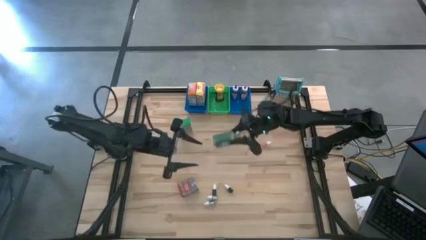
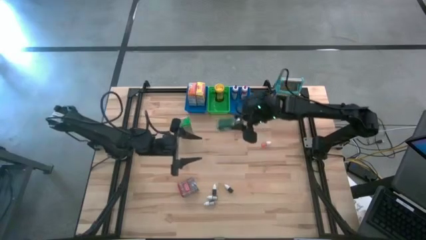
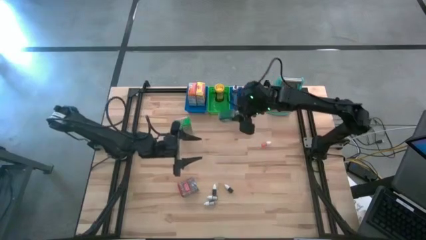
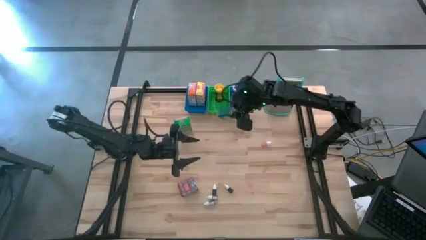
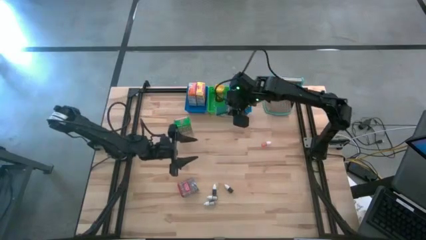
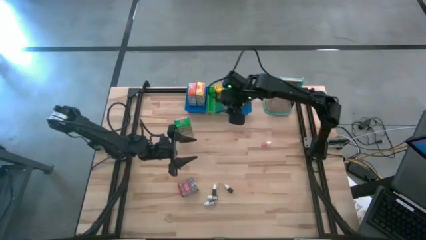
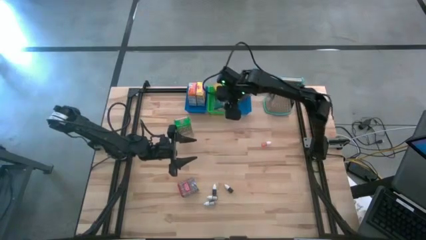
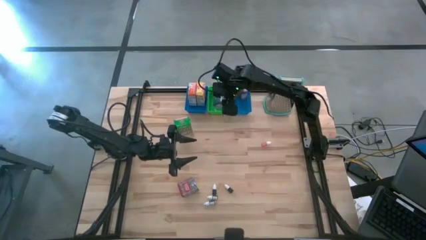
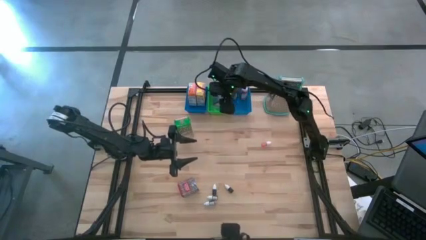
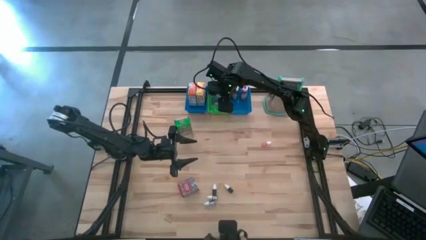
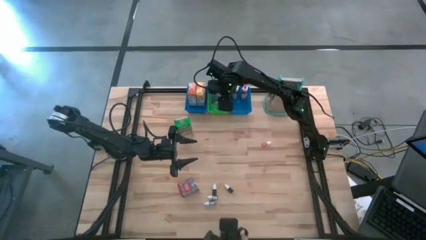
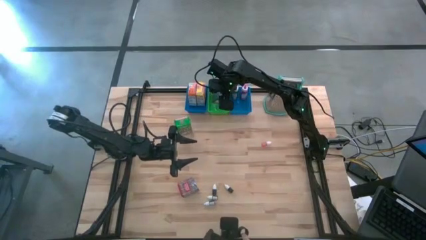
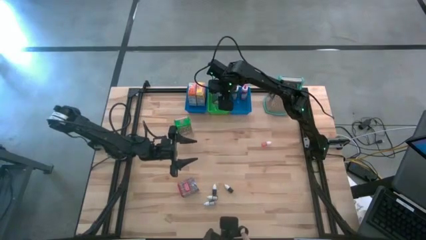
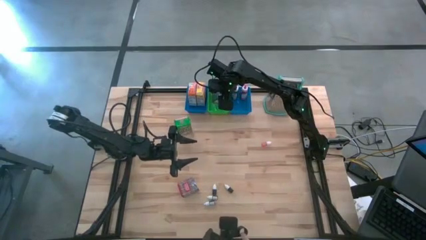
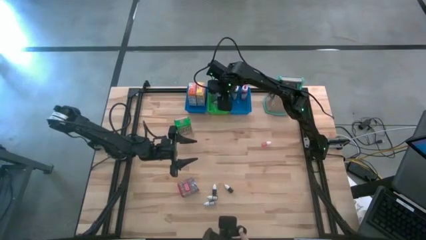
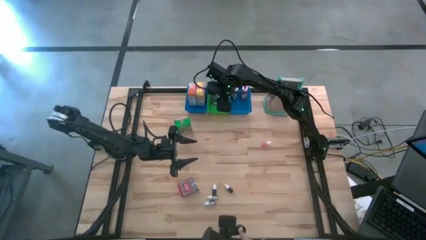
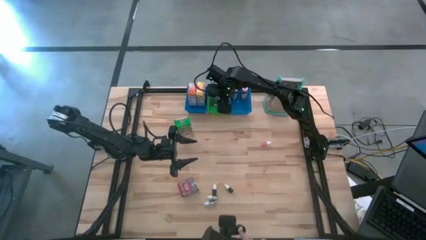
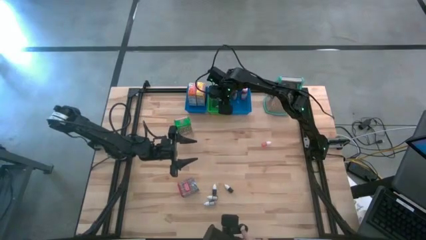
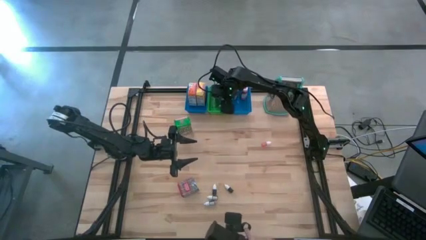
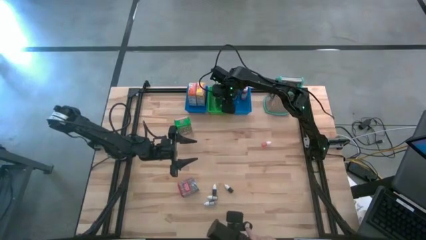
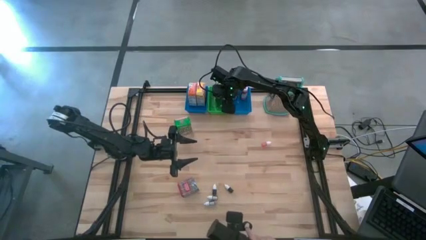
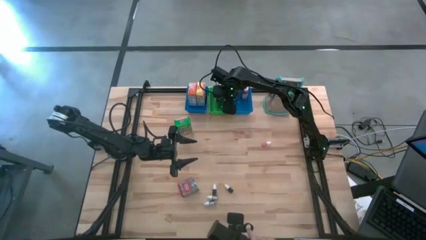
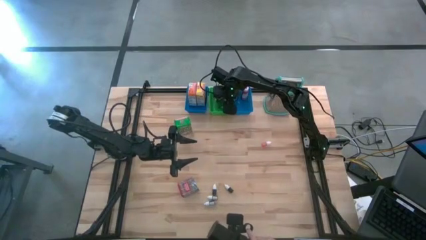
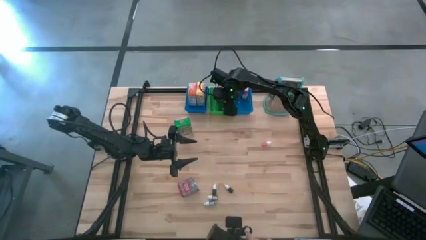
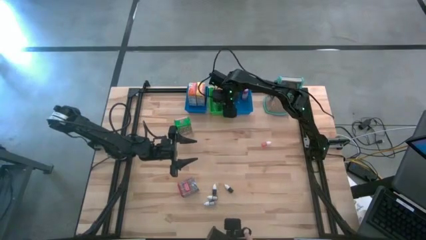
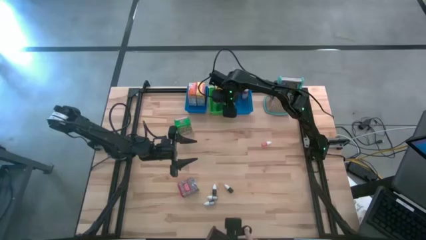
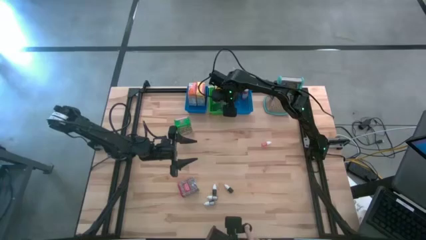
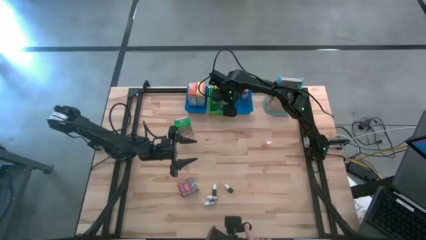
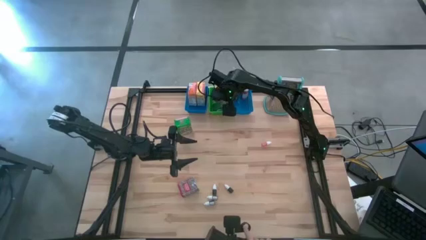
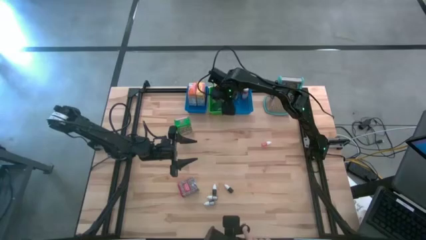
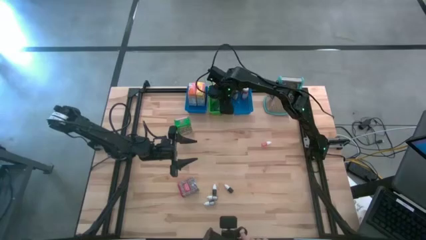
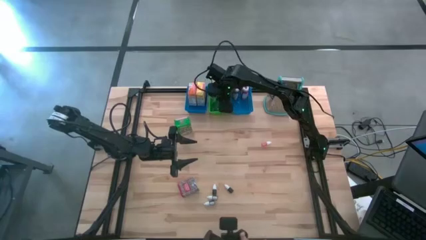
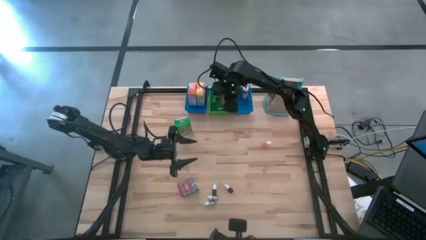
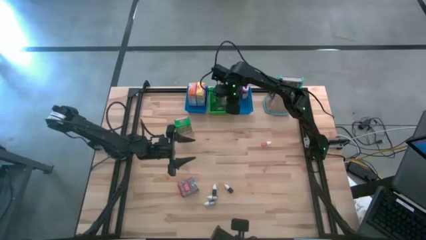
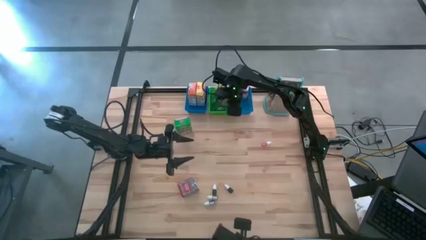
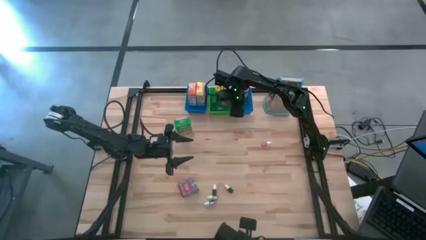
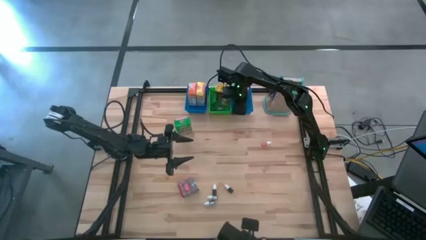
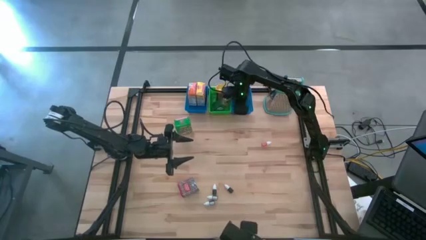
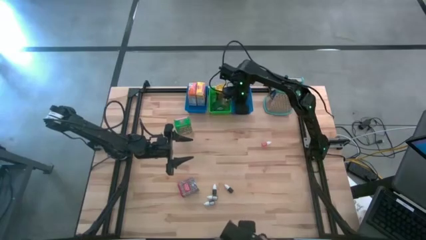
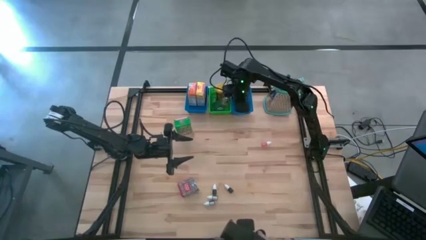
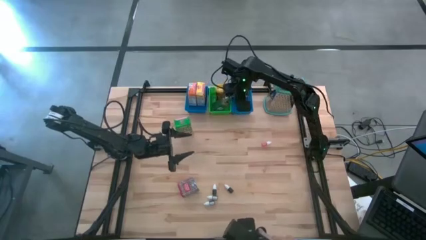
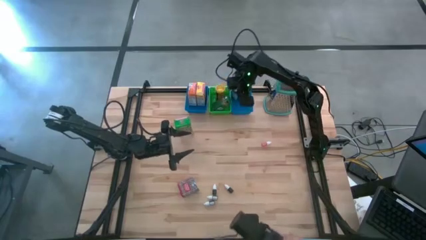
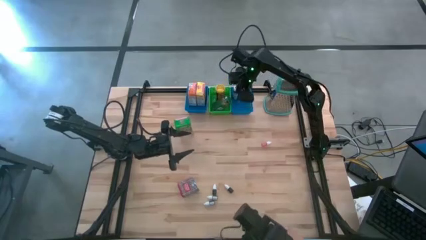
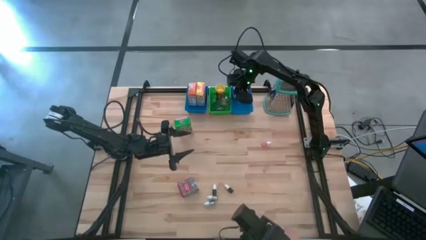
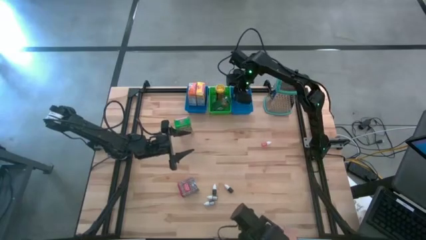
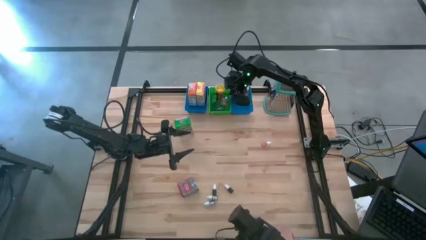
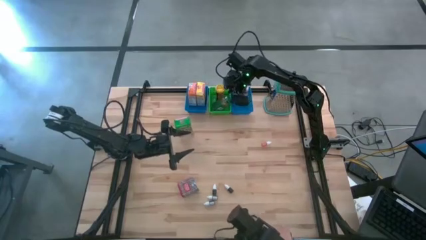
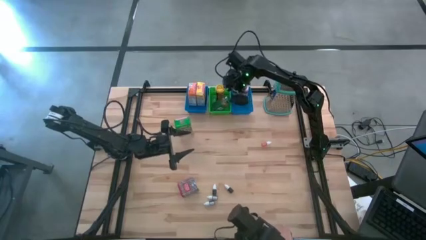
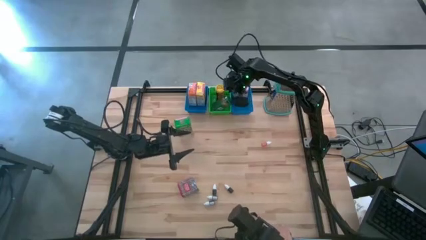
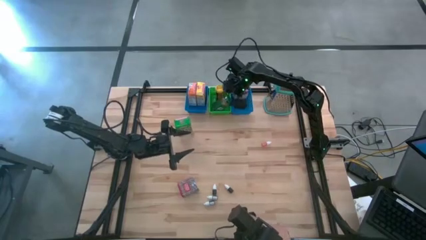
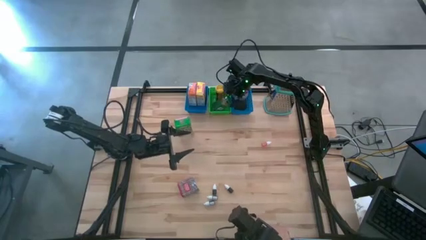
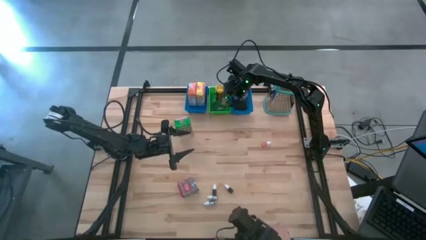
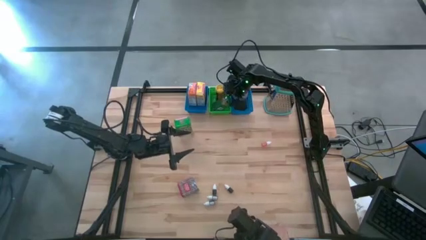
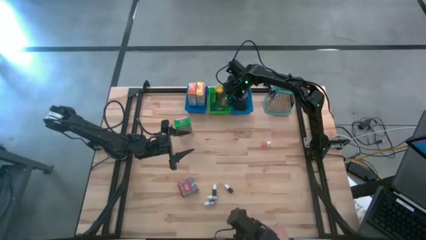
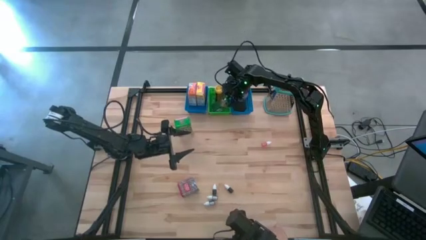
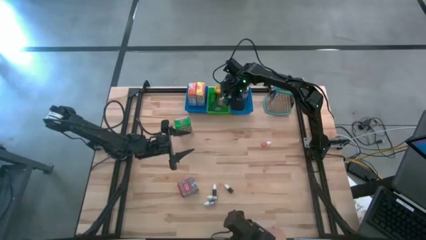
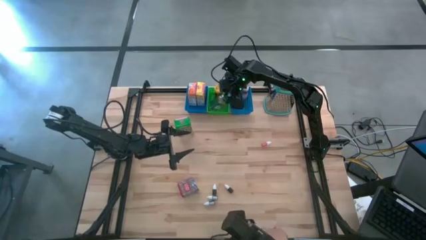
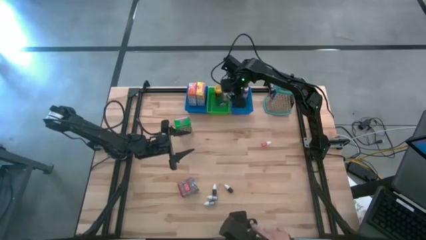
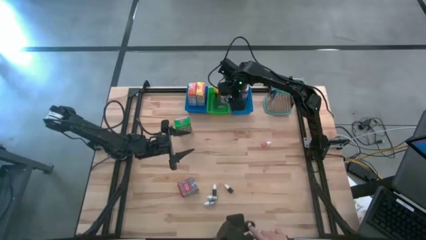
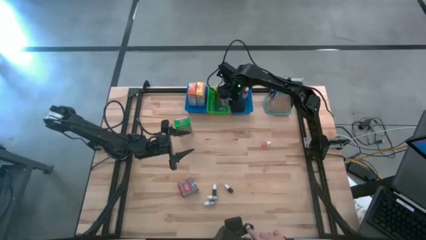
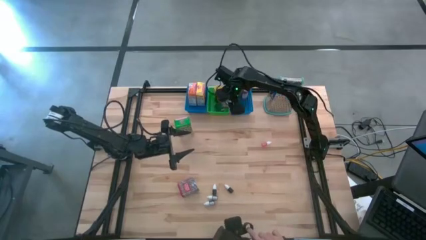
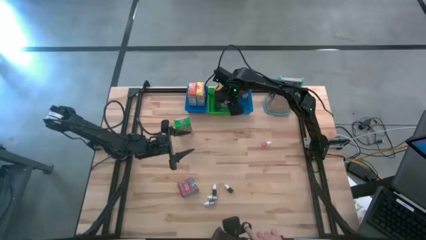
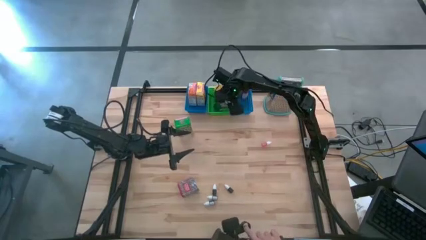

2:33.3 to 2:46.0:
Task: Pick & Place Kitchen Items
Put the green seasoning bottle into the green bin

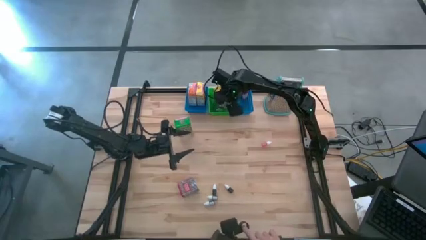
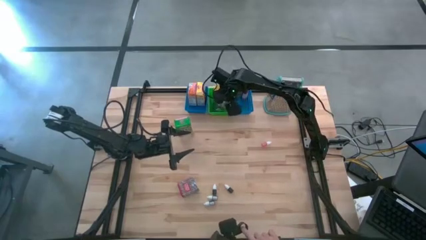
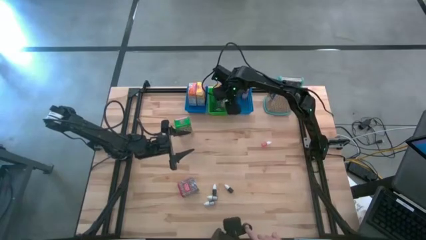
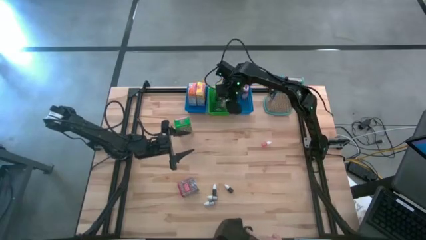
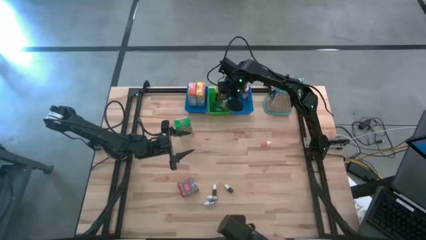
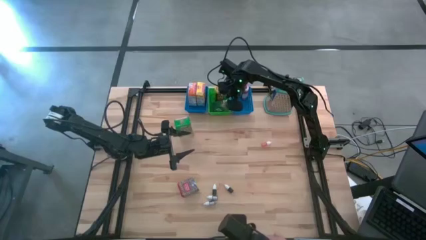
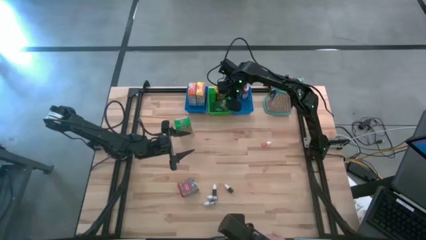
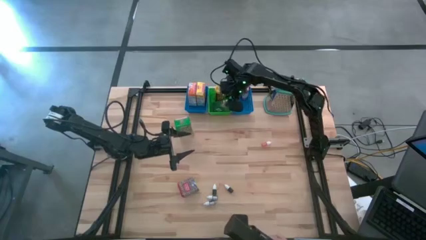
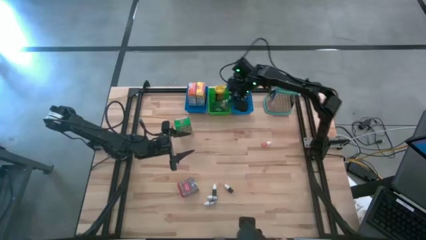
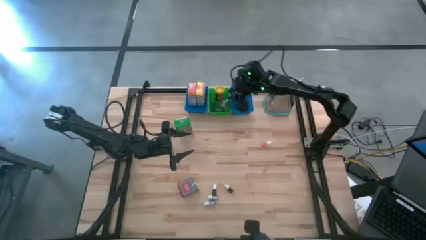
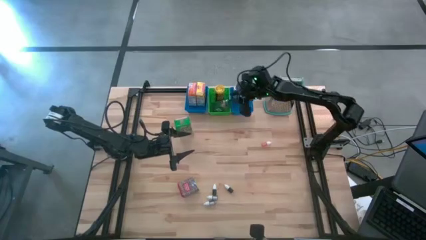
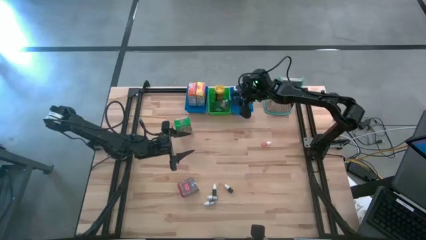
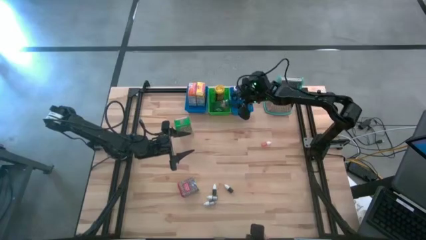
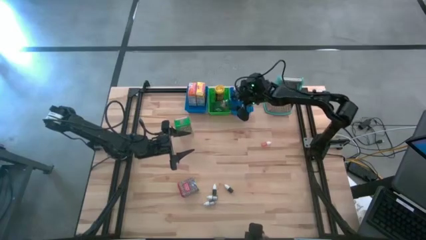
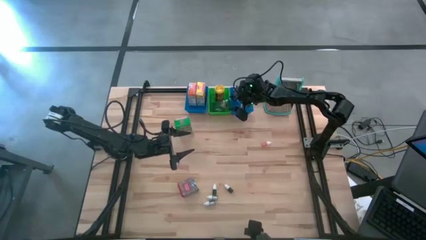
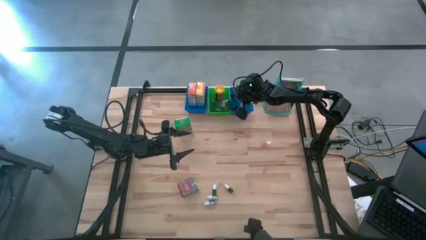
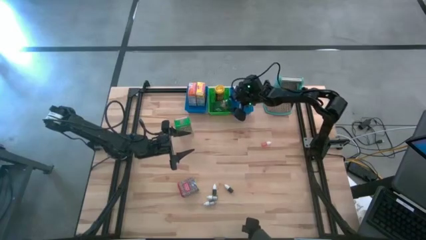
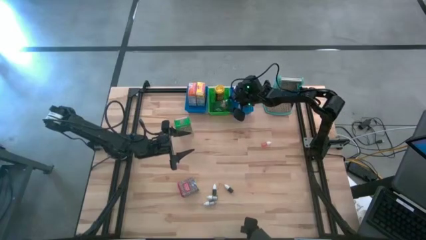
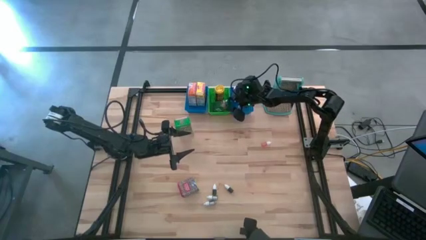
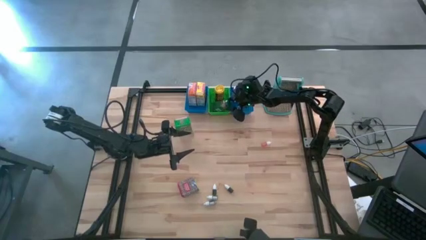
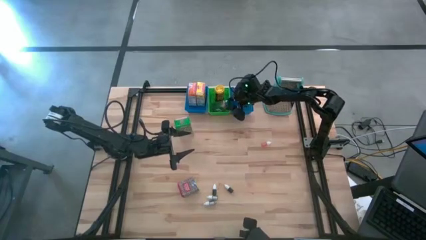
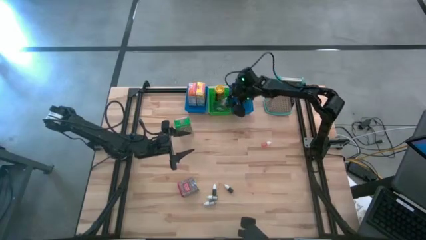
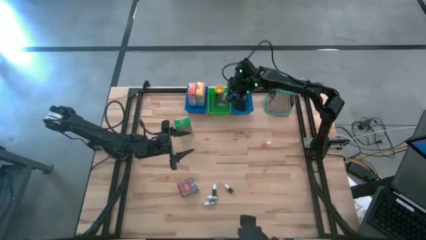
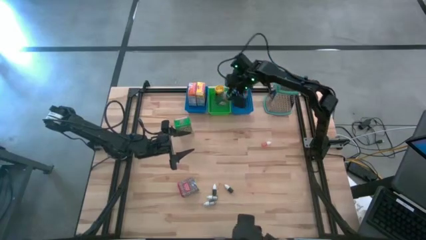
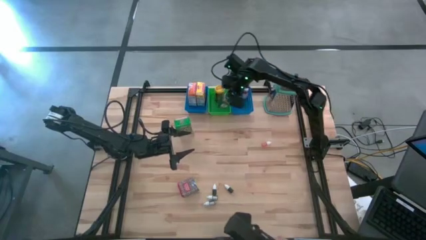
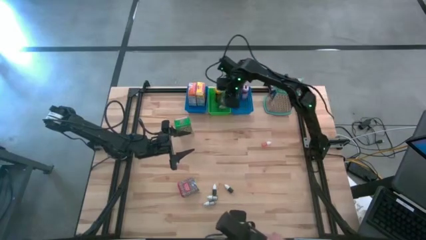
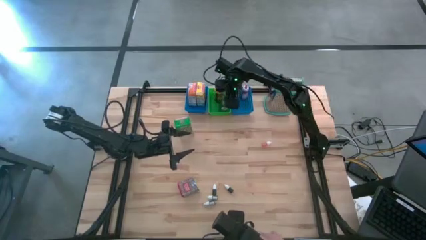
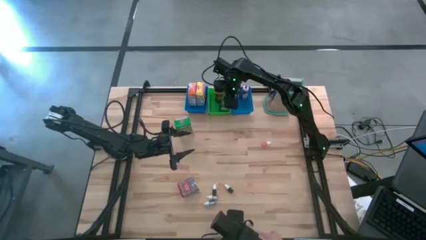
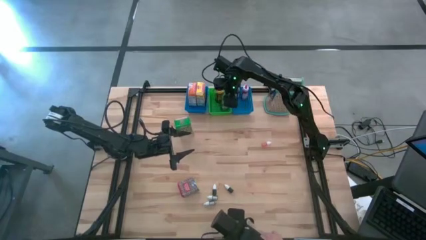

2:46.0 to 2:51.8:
Put the green seasoning bottle into the green bin
